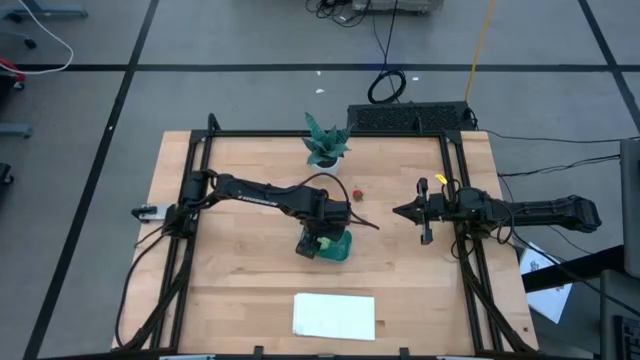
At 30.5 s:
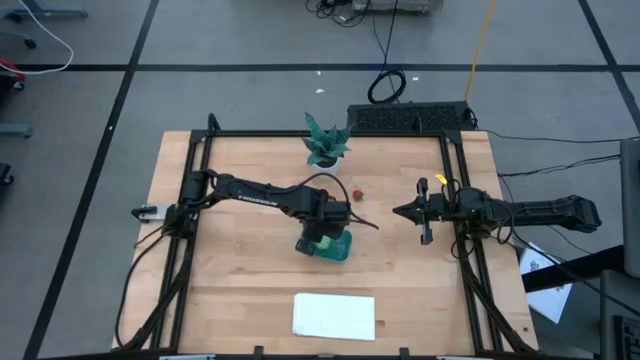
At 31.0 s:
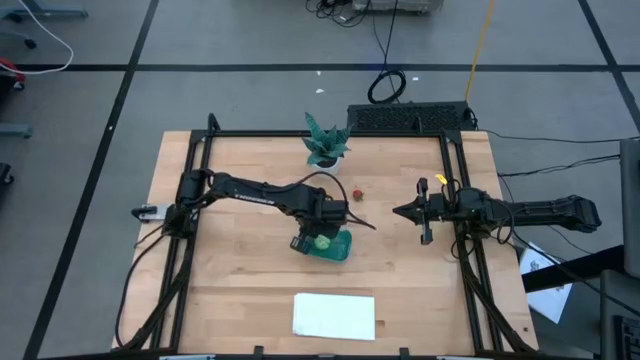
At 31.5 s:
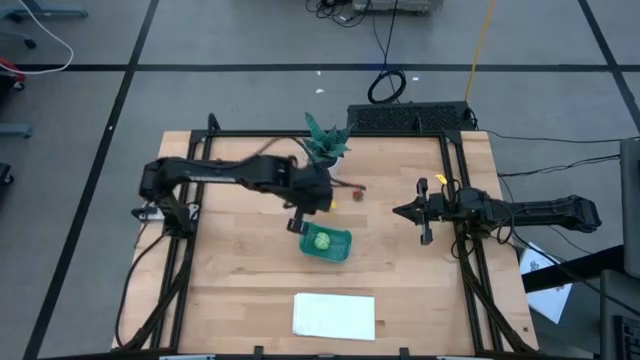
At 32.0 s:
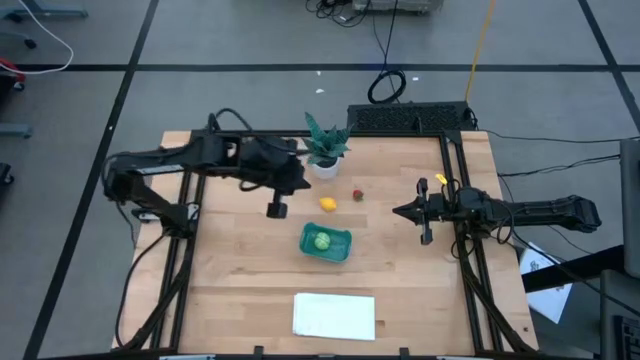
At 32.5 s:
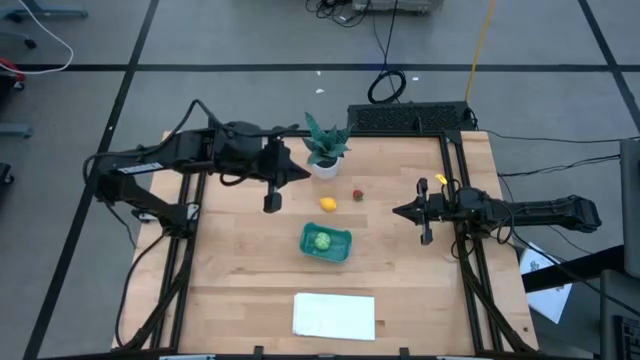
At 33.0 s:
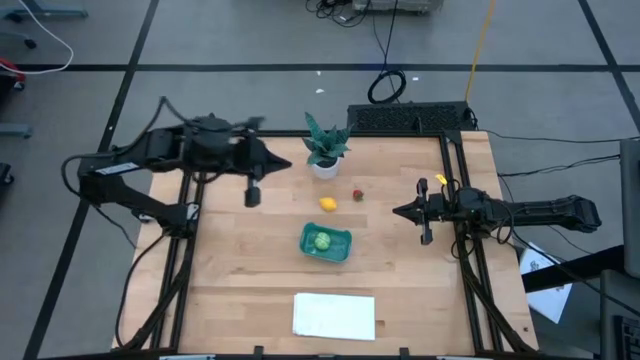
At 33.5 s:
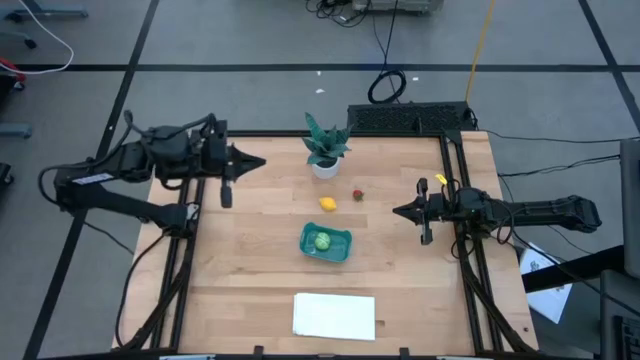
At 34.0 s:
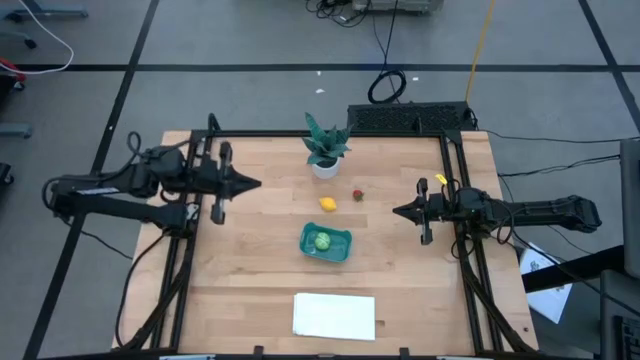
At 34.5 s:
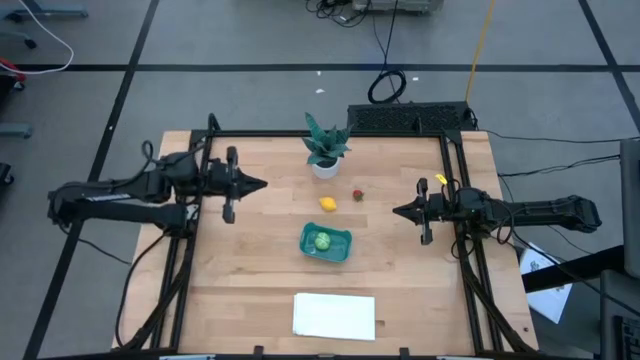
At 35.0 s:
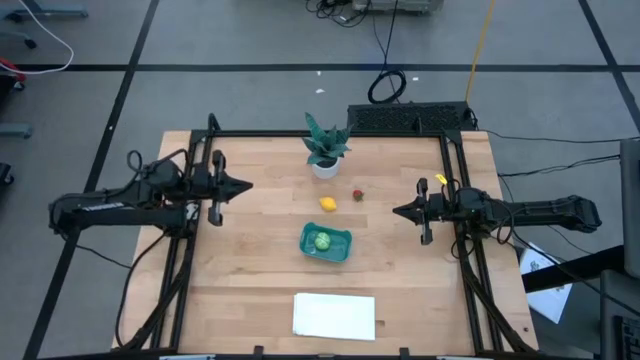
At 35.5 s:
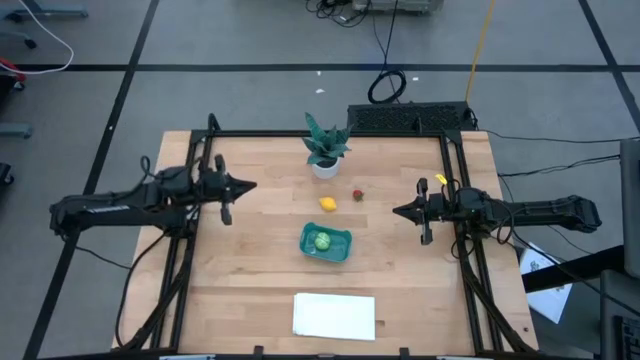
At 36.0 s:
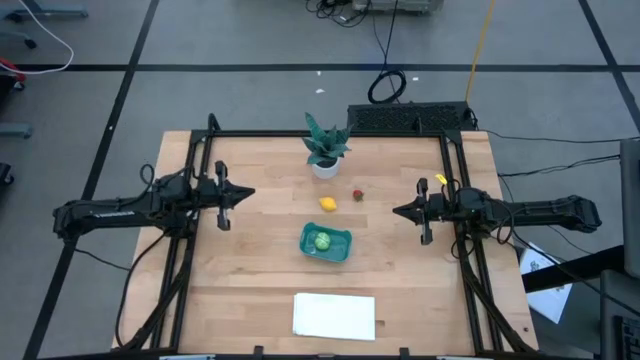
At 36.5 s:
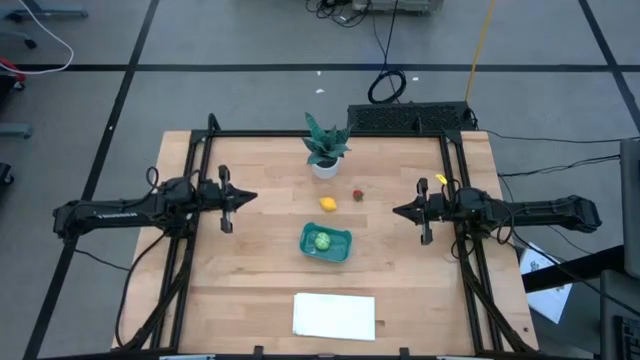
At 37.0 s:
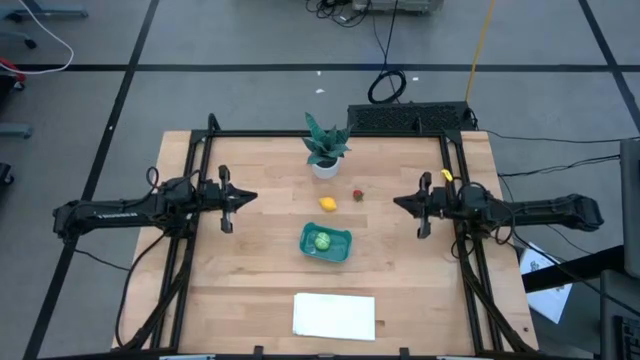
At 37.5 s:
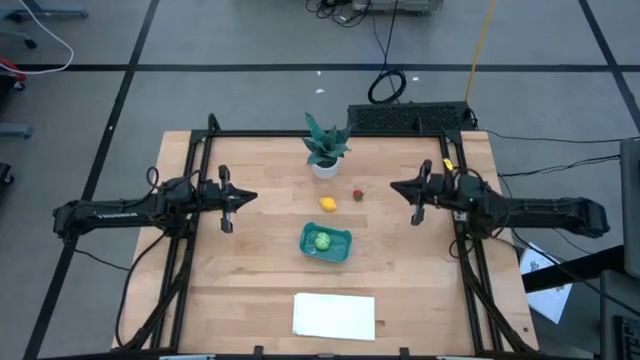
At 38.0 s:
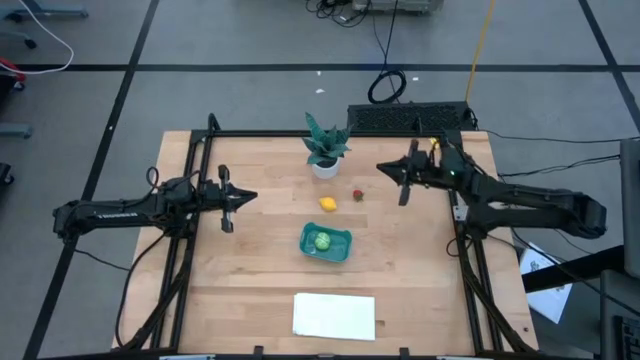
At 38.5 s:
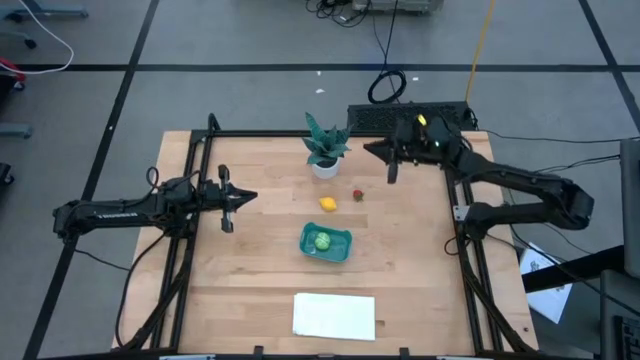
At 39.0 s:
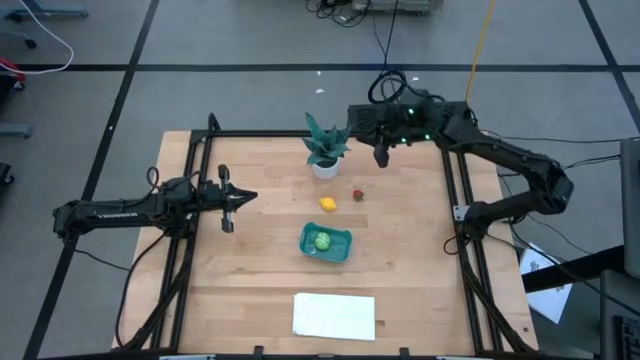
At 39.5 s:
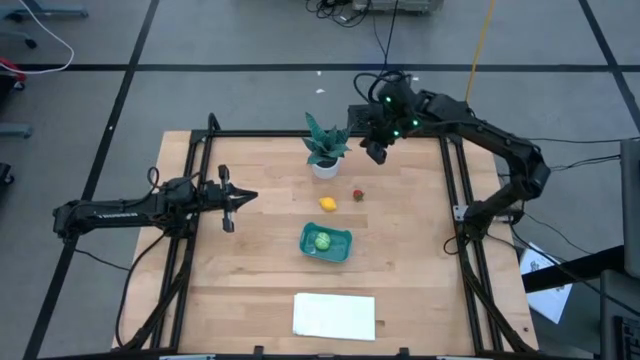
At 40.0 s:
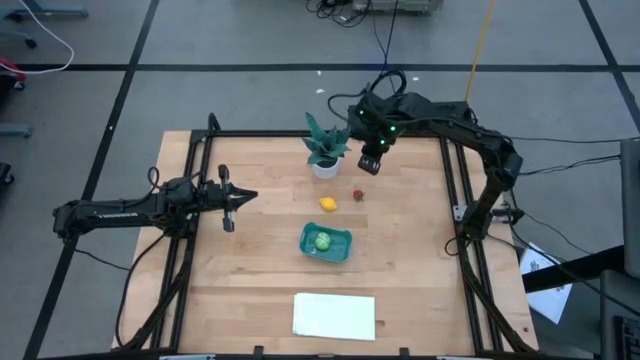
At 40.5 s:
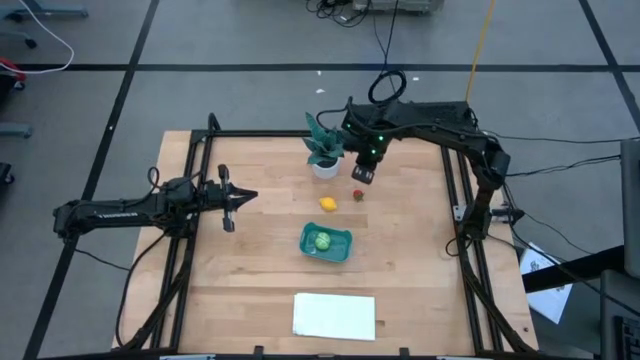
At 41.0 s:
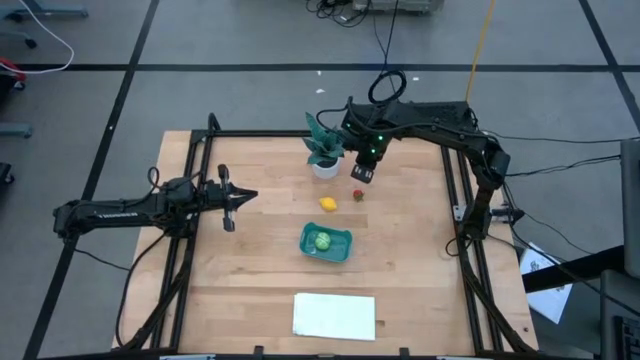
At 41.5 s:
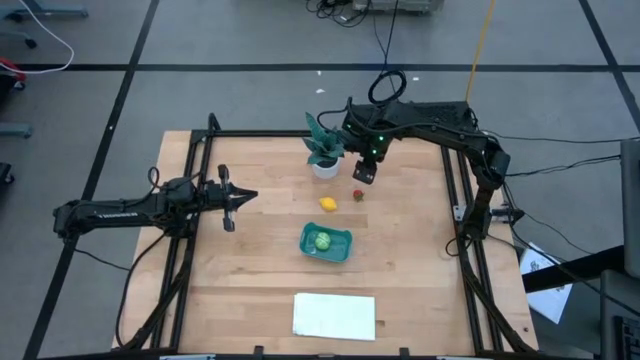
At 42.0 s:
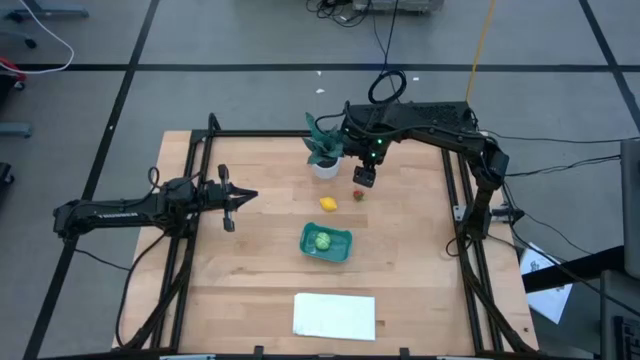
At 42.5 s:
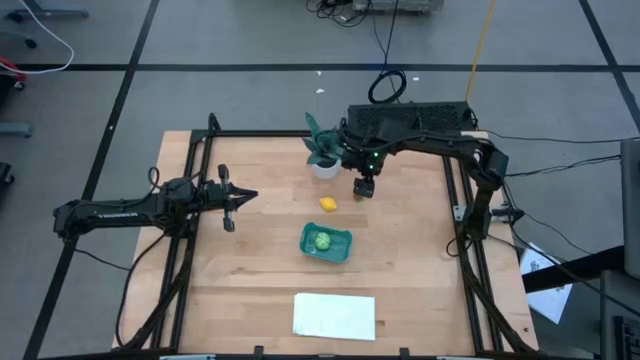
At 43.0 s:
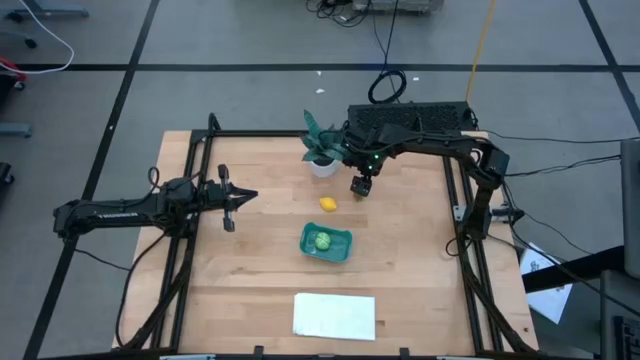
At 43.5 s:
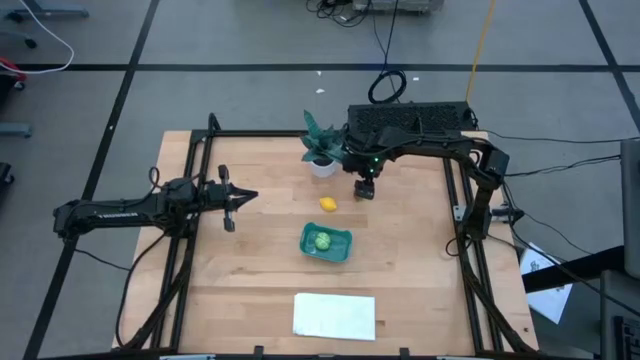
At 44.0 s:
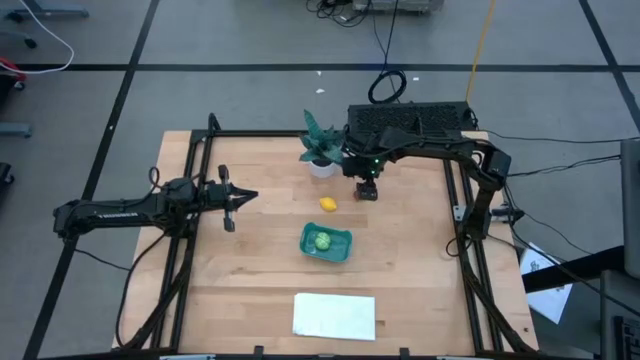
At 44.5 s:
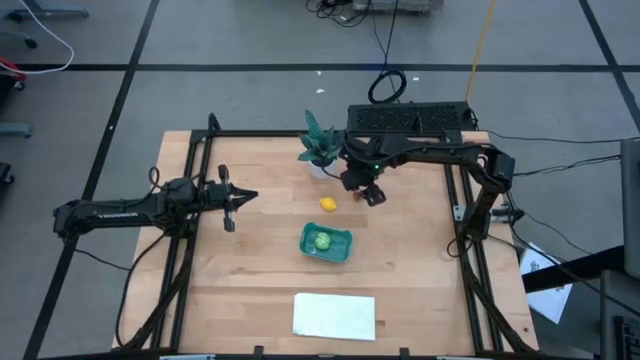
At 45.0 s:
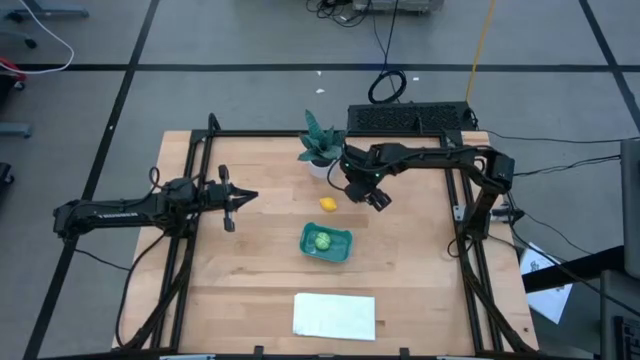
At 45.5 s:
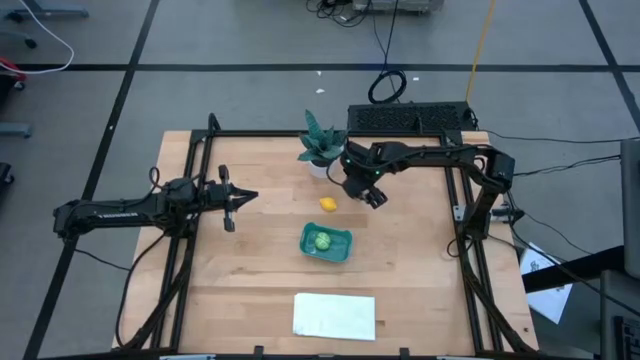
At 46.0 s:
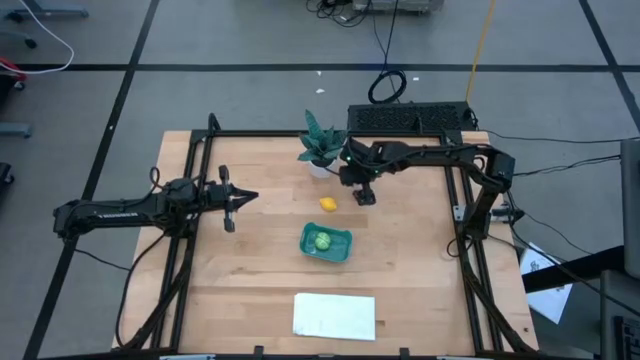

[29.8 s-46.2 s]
Task: Pick and placing Produce into tupperware
Put the red strawberry into the green bin
